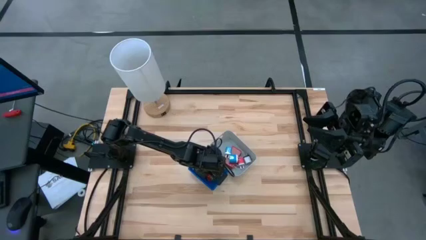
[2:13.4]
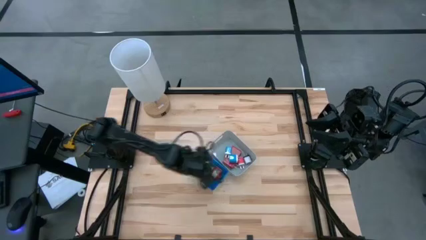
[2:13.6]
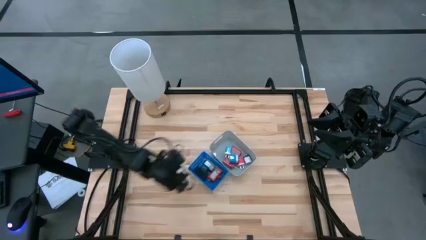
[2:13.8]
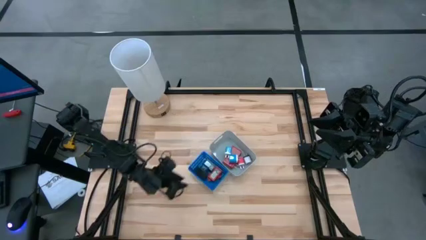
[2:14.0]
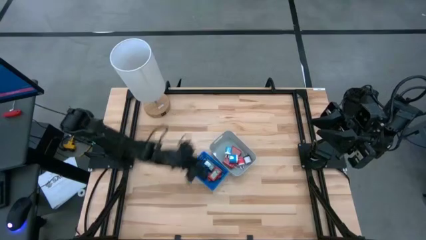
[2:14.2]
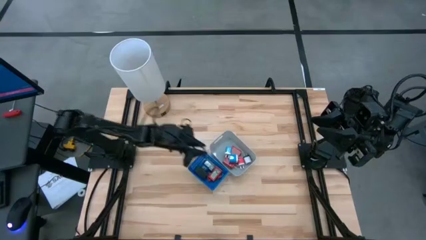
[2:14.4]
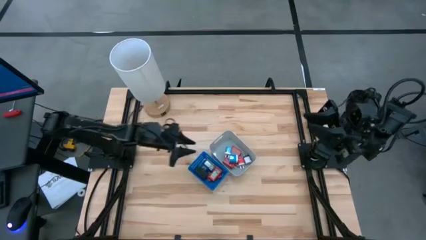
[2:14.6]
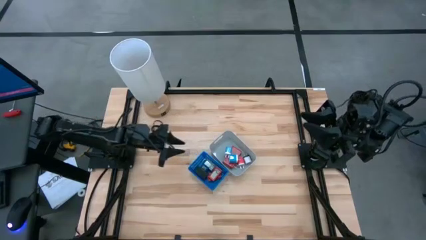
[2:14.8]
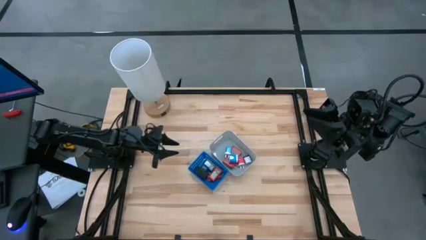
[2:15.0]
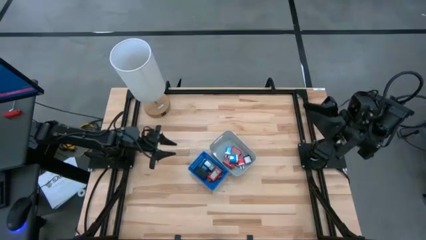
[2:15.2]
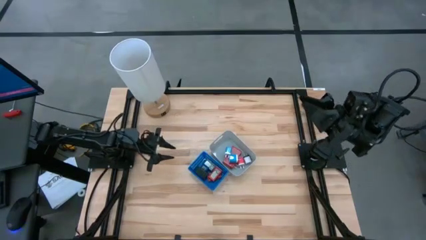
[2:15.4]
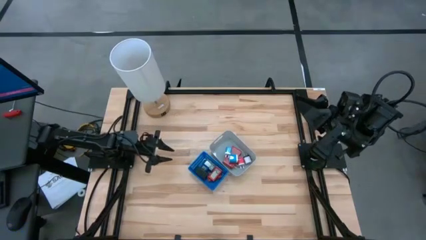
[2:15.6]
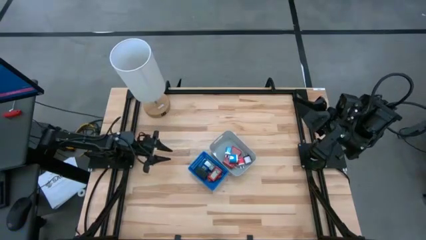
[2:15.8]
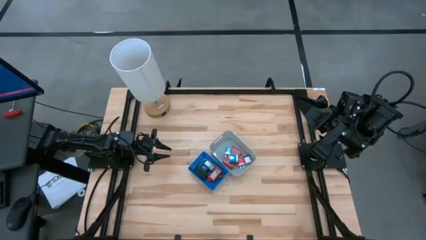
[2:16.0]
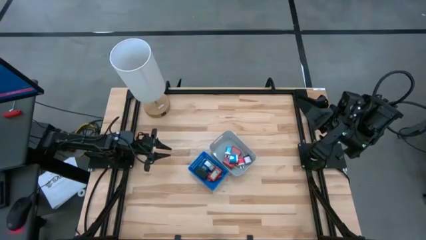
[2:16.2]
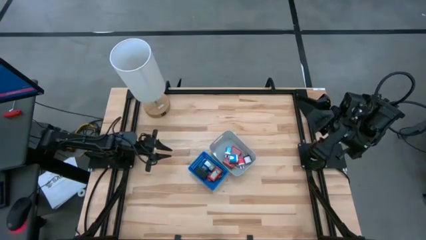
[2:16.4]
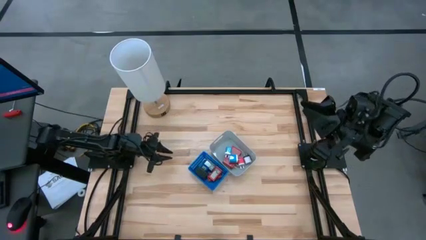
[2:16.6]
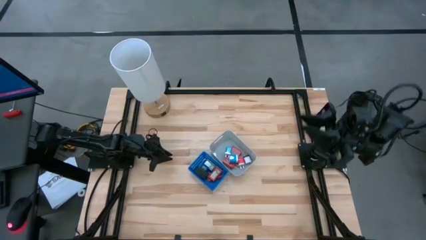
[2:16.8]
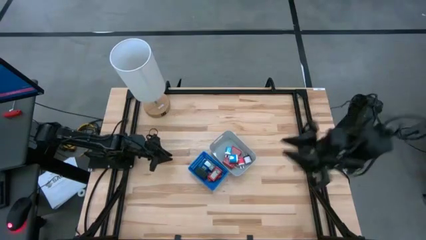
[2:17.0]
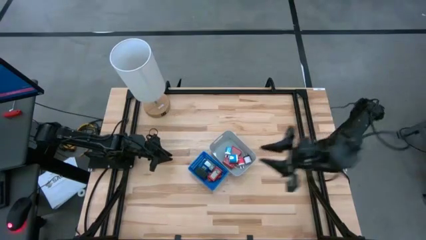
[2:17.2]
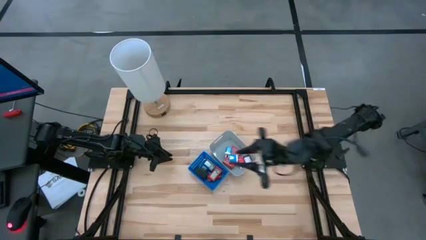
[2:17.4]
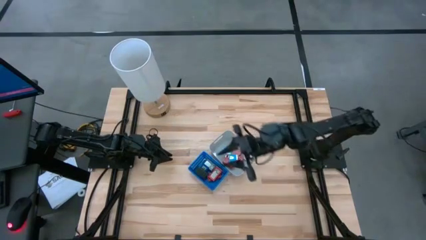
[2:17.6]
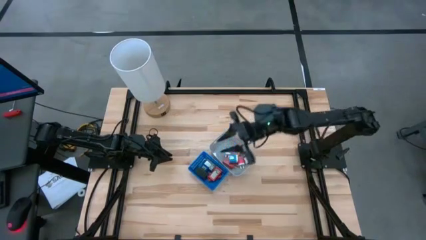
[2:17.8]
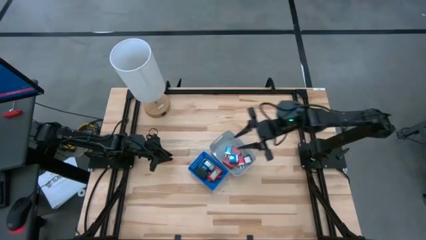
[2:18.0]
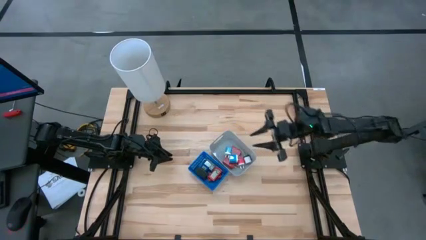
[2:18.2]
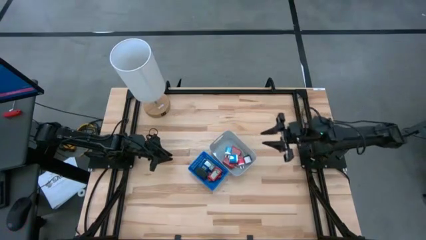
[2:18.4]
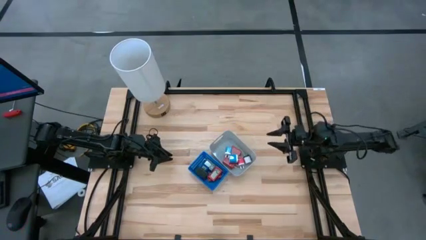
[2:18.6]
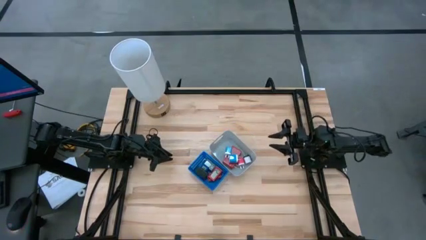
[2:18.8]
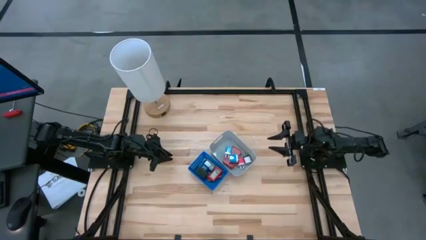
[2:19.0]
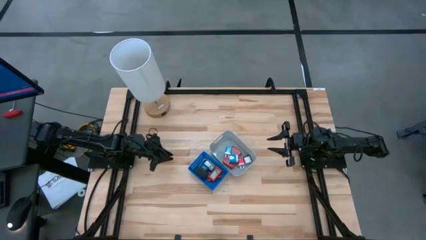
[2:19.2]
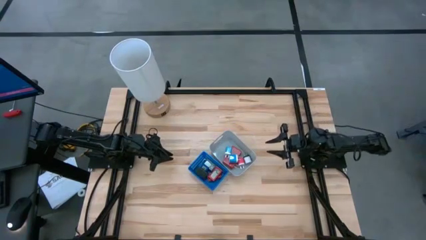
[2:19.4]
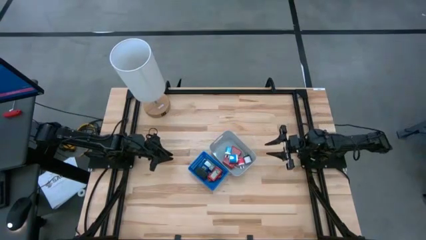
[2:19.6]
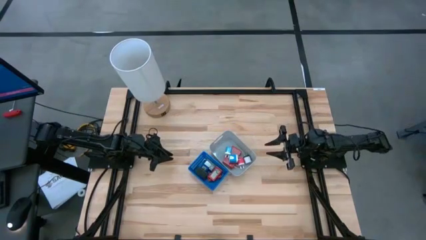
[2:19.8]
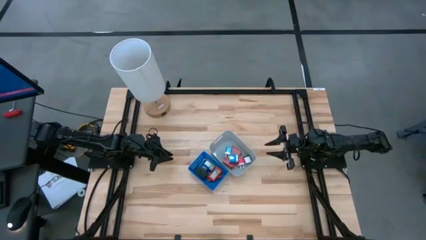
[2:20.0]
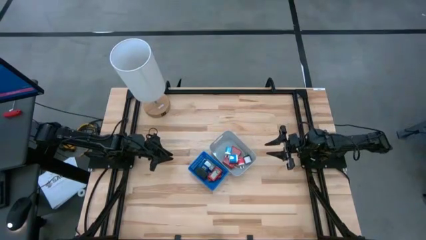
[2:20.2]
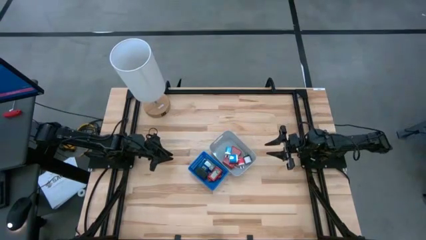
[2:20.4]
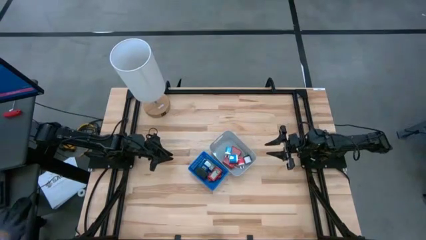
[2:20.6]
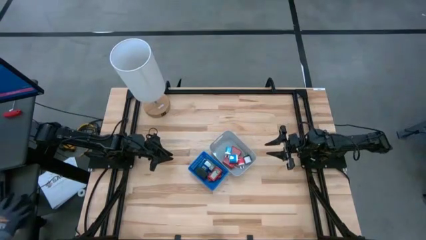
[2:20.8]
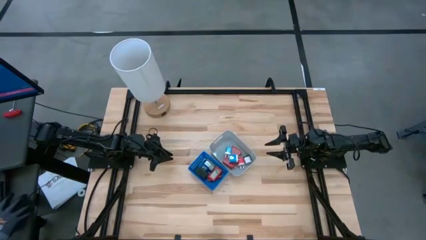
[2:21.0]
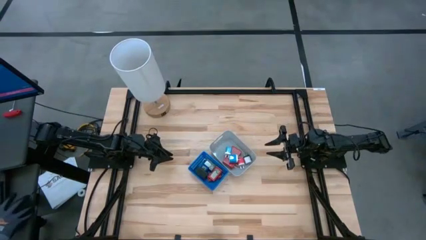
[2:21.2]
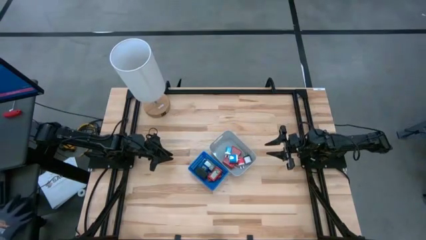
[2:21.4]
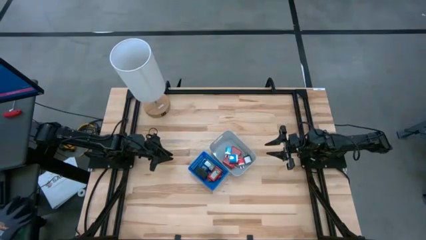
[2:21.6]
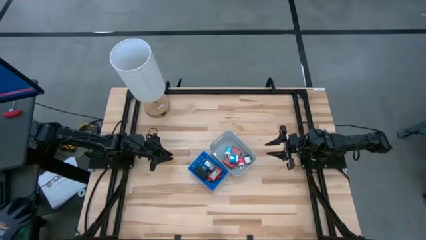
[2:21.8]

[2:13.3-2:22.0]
Task: Pick & Place Office items
Return to Home position

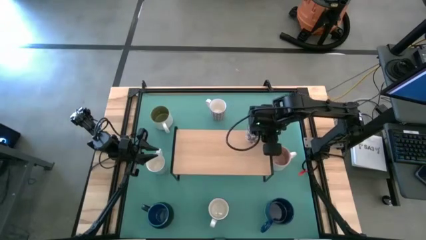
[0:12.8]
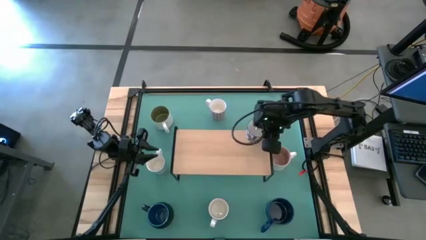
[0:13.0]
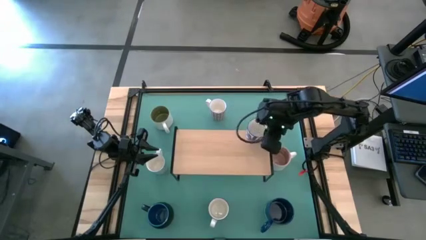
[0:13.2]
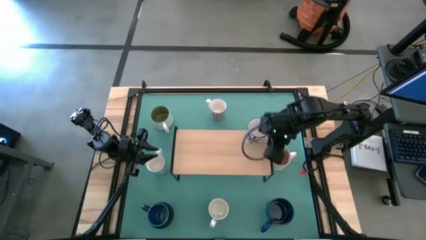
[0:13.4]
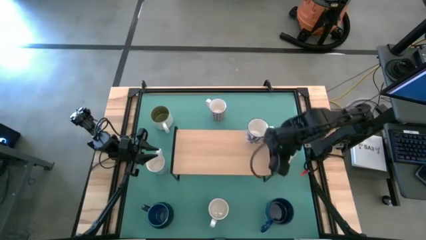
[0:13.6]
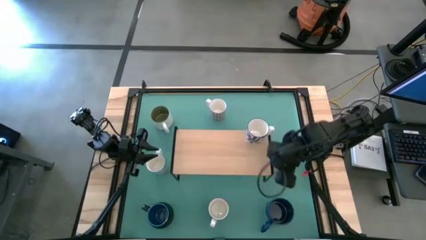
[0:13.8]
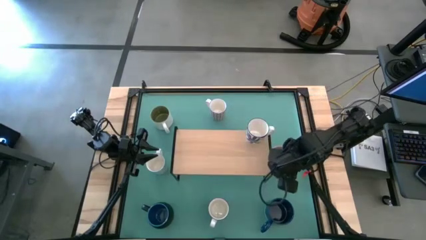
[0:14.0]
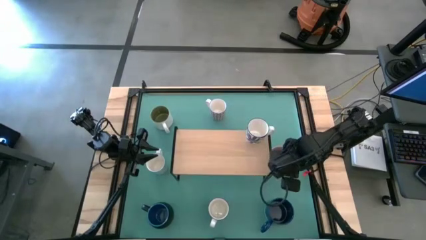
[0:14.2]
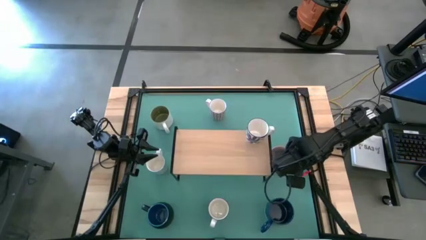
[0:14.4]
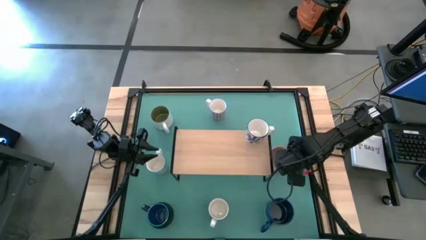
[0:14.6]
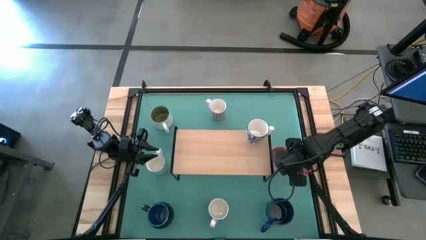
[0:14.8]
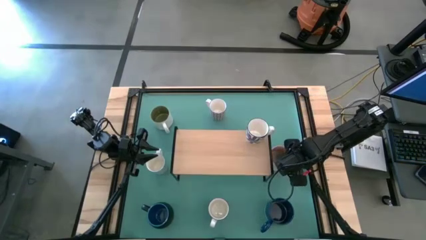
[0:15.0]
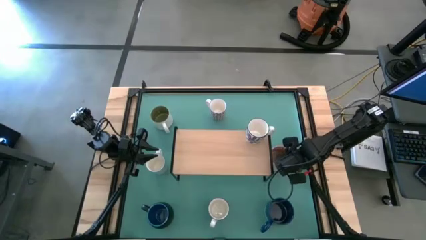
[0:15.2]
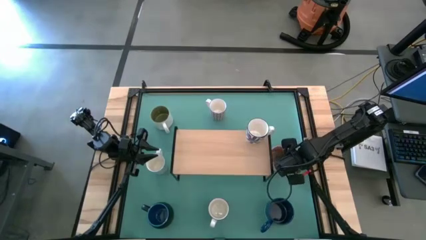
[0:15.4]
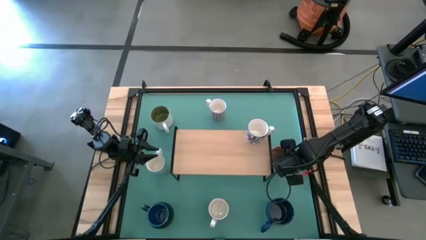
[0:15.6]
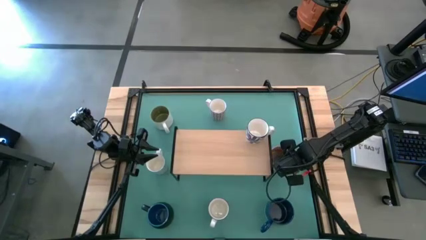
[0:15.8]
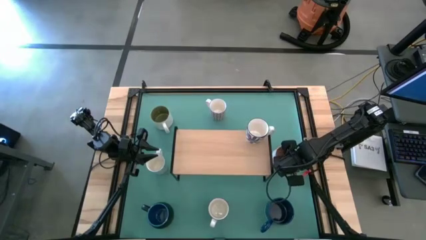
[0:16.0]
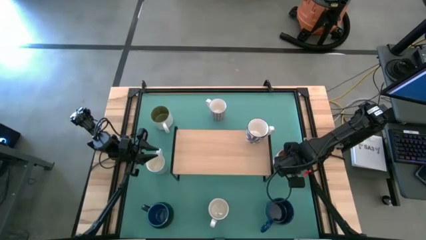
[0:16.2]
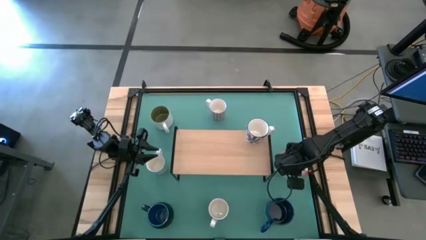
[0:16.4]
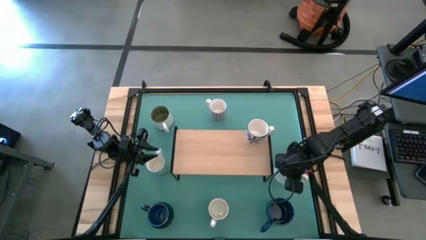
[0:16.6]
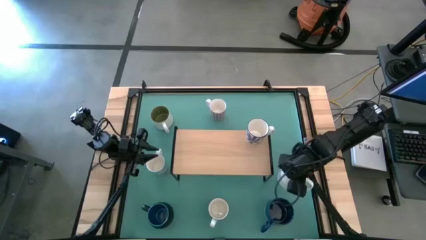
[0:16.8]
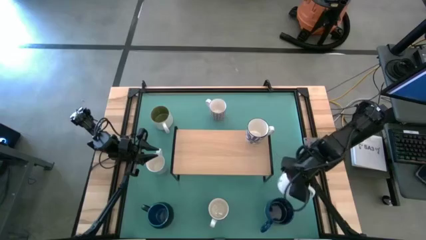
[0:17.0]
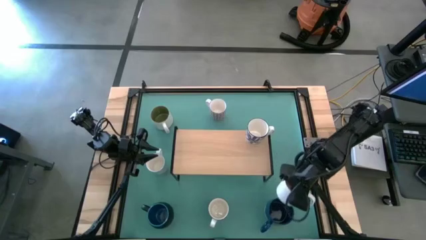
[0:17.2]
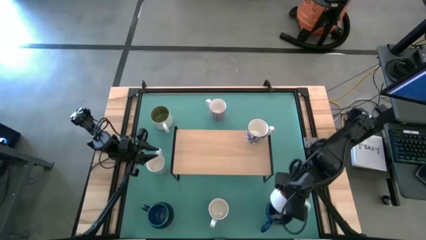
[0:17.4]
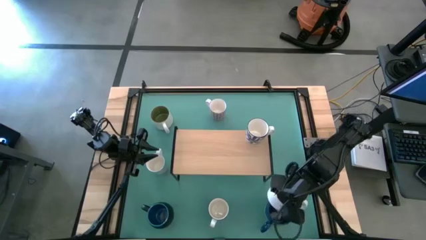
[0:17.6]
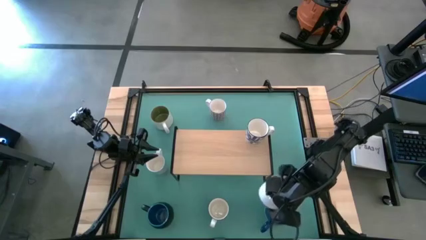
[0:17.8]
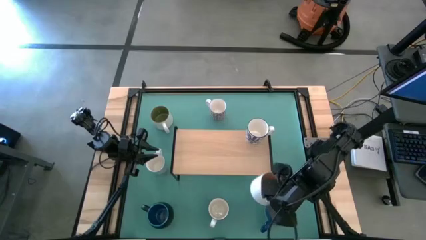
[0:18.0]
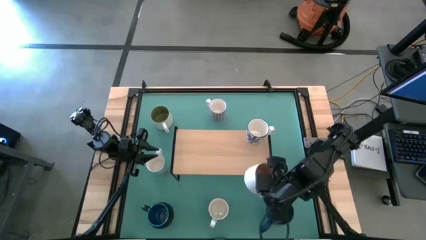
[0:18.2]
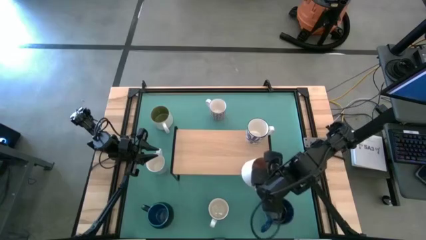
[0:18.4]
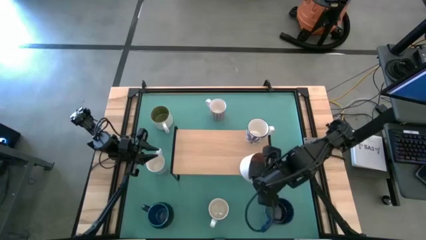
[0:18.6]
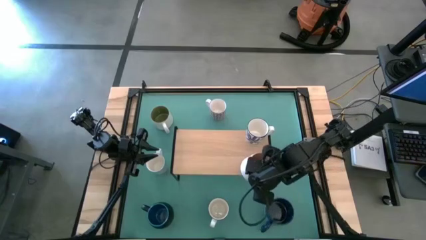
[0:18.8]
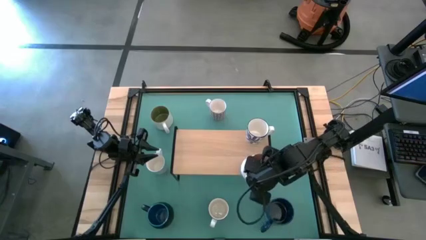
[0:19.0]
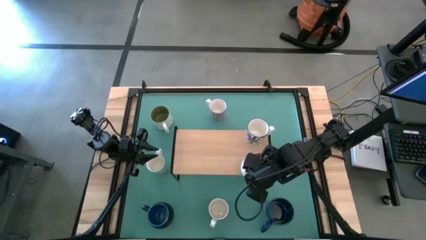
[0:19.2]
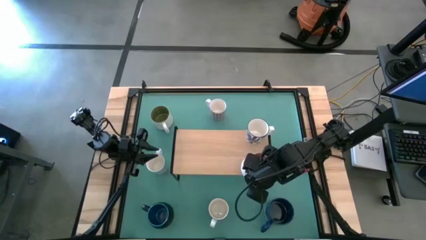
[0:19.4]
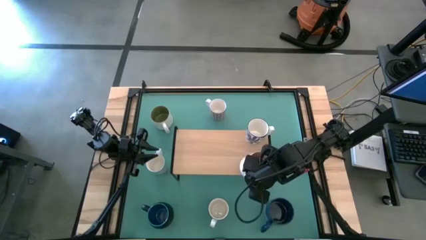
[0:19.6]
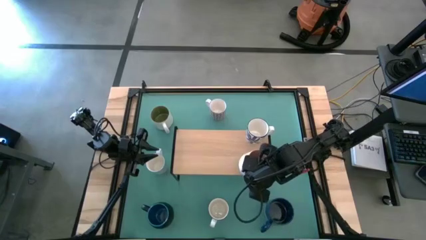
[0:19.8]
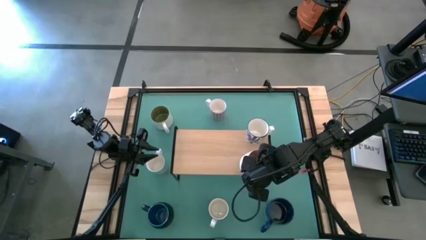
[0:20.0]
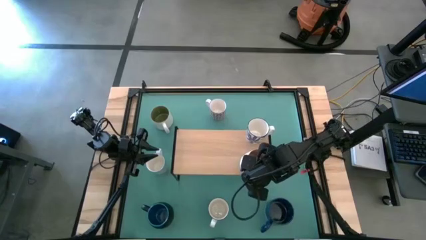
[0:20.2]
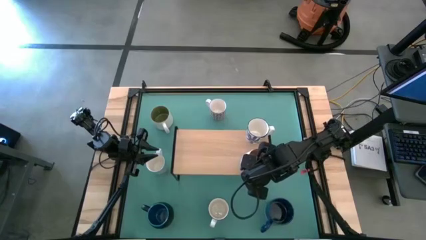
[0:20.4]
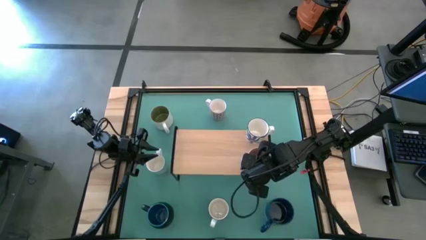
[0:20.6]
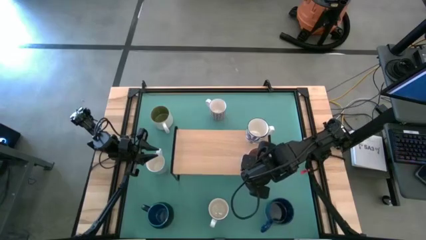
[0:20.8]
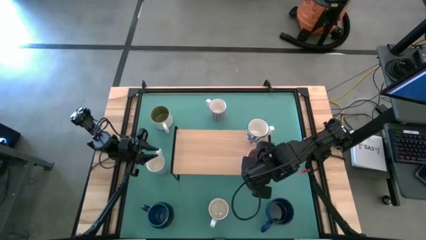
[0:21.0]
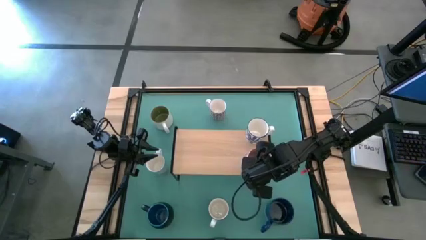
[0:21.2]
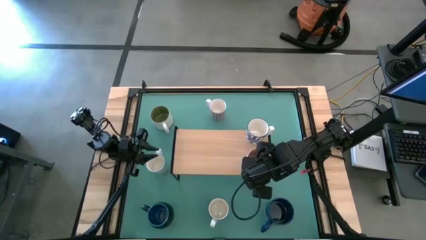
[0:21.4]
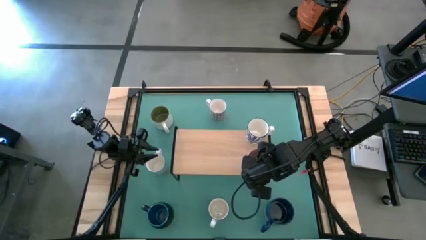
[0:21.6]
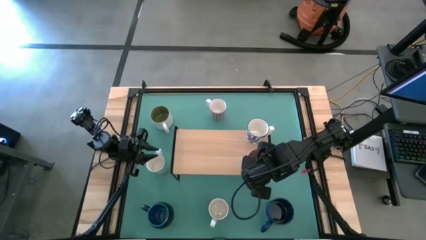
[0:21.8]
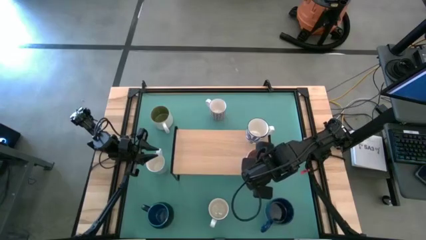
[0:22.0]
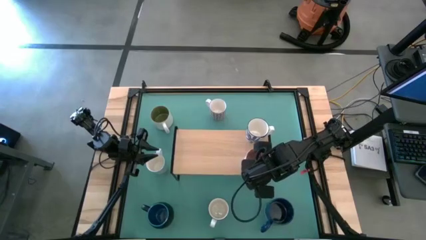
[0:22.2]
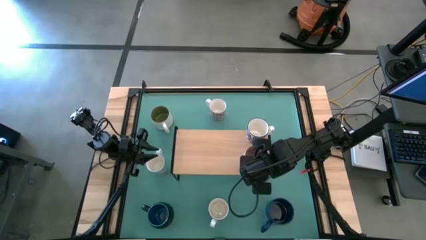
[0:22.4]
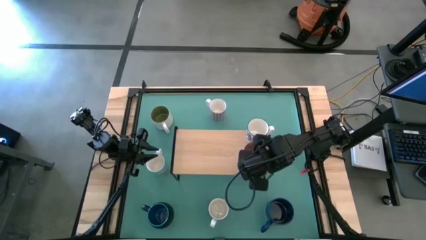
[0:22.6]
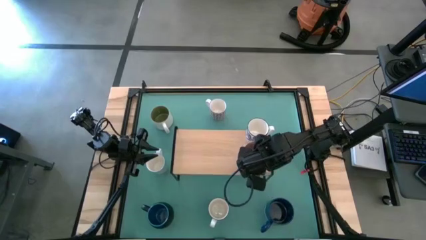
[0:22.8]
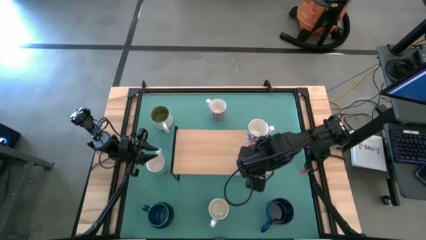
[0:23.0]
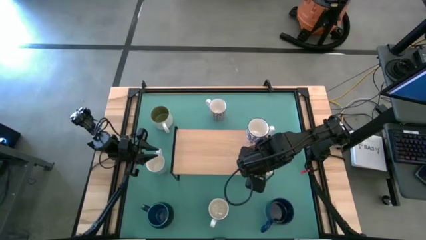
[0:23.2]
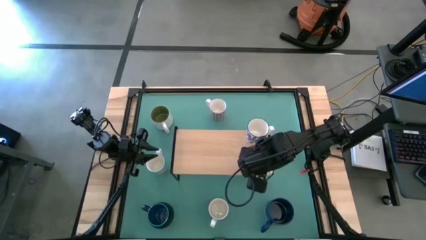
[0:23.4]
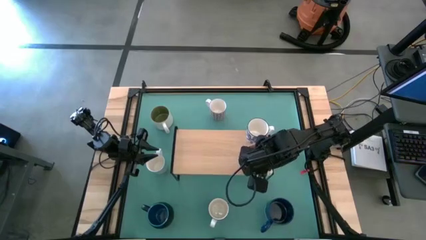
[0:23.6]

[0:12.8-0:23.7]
Task: Place coffee mugs
Put the white green mug on the shelf
